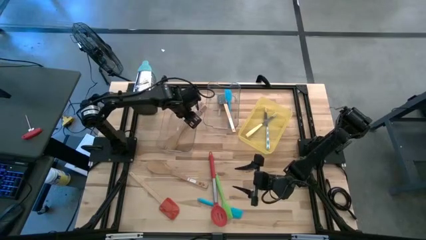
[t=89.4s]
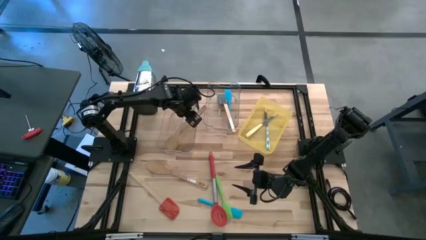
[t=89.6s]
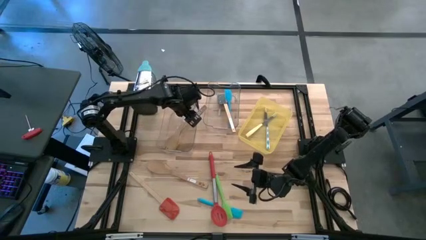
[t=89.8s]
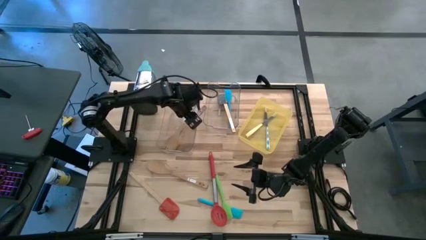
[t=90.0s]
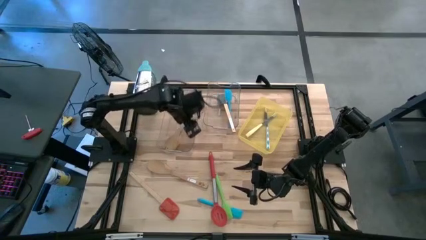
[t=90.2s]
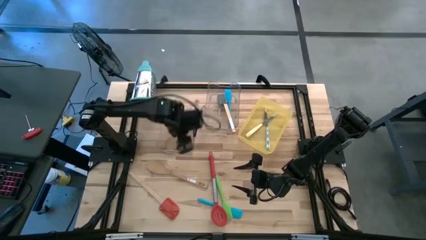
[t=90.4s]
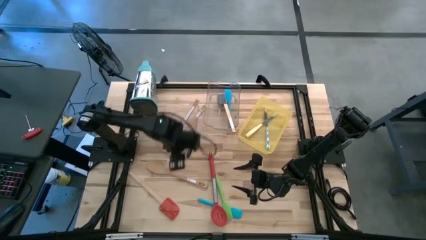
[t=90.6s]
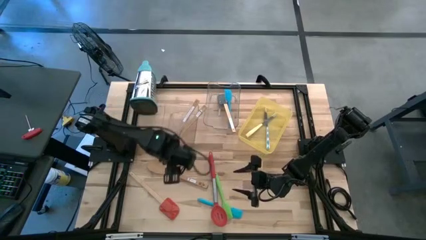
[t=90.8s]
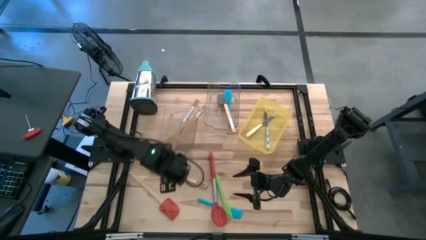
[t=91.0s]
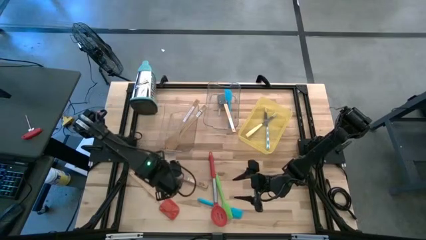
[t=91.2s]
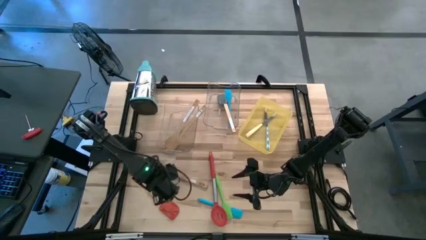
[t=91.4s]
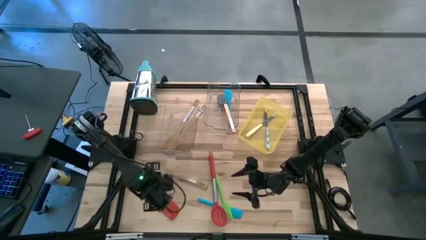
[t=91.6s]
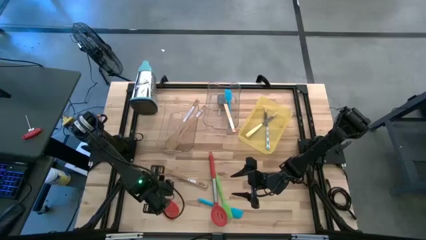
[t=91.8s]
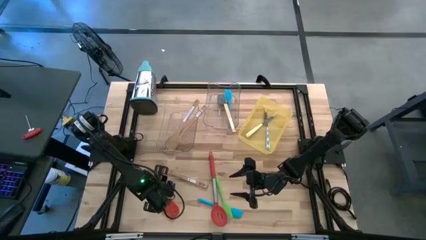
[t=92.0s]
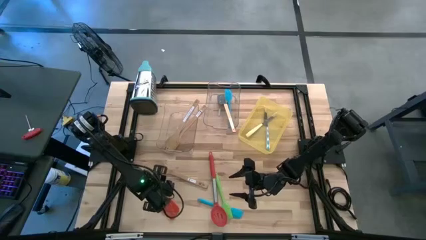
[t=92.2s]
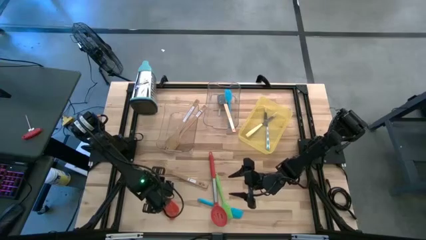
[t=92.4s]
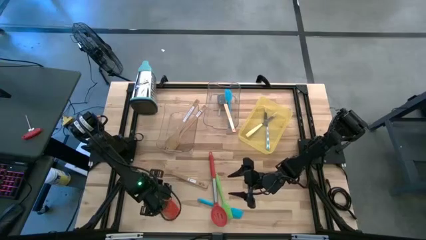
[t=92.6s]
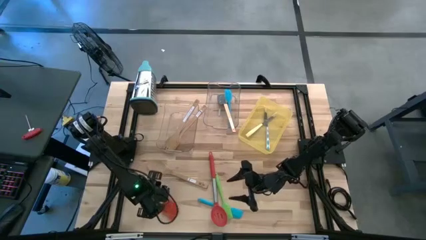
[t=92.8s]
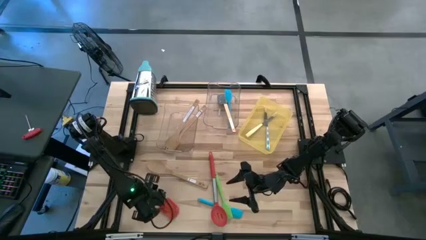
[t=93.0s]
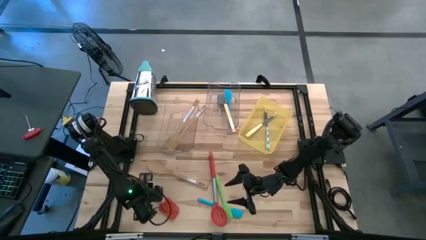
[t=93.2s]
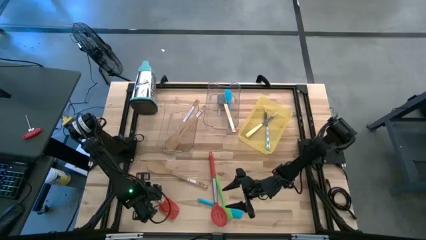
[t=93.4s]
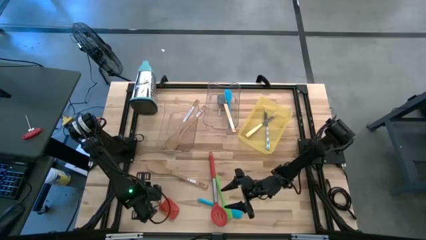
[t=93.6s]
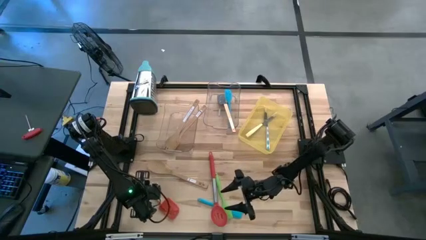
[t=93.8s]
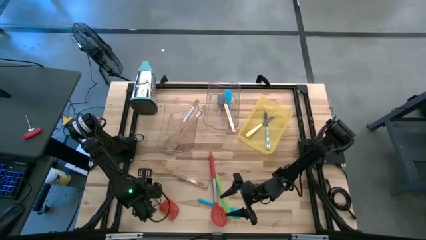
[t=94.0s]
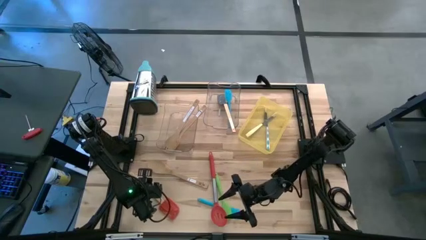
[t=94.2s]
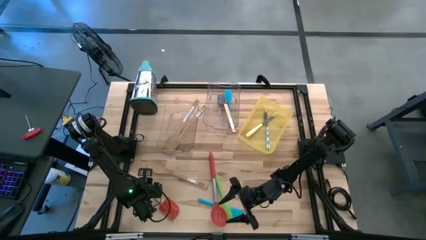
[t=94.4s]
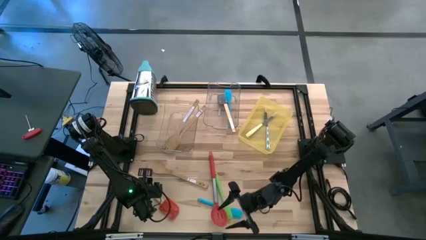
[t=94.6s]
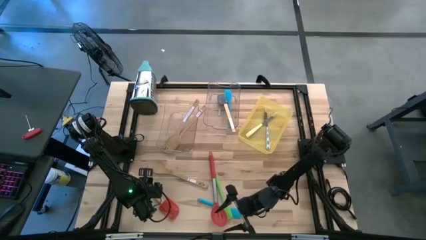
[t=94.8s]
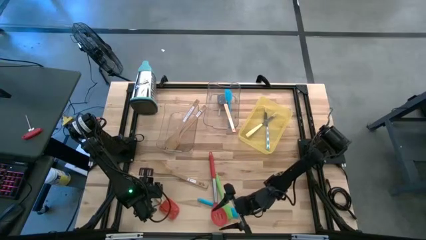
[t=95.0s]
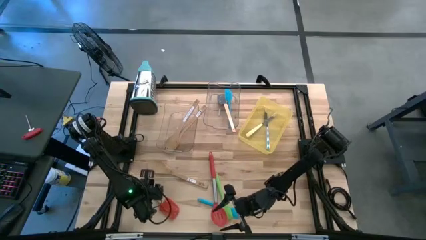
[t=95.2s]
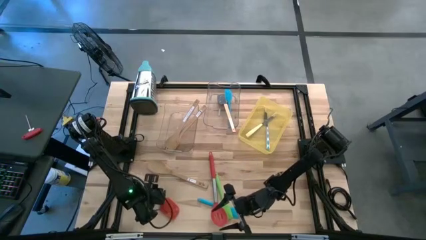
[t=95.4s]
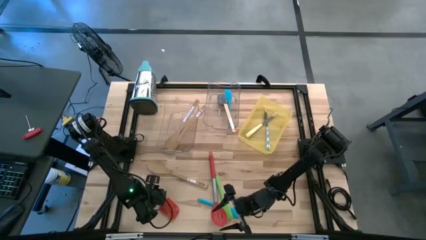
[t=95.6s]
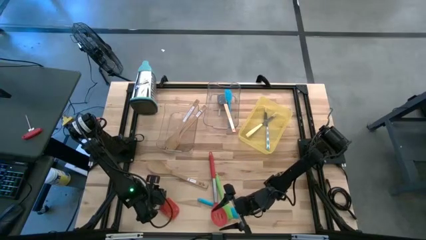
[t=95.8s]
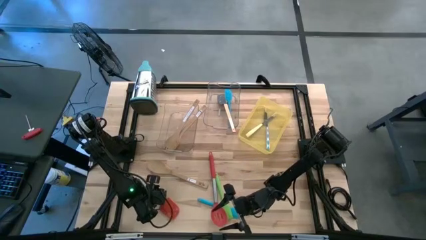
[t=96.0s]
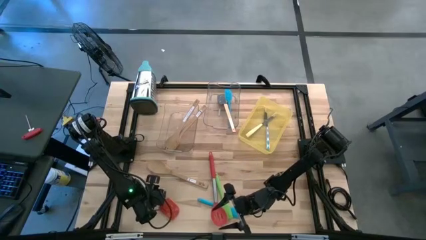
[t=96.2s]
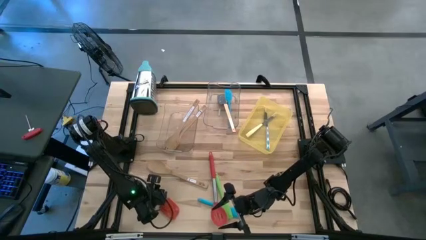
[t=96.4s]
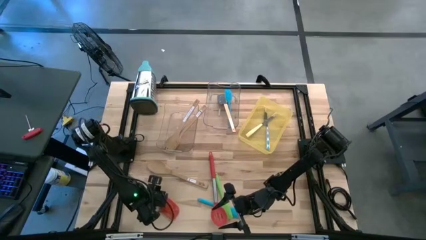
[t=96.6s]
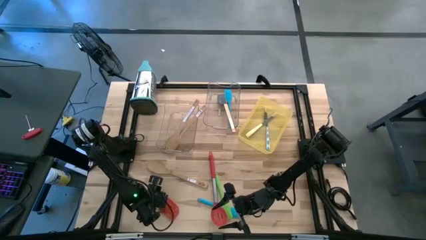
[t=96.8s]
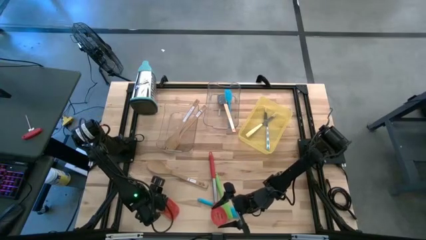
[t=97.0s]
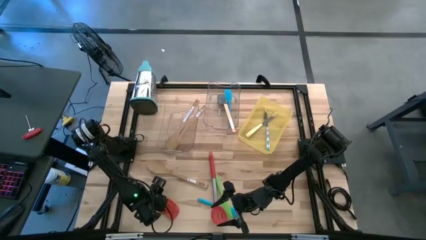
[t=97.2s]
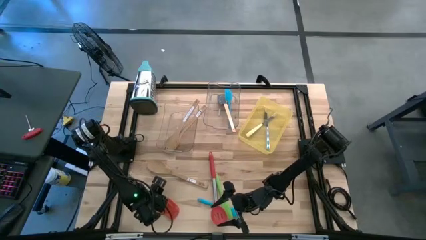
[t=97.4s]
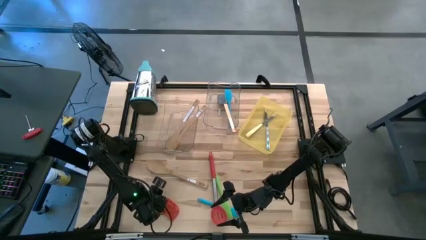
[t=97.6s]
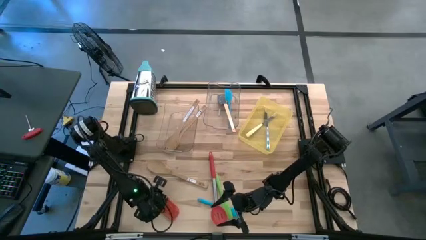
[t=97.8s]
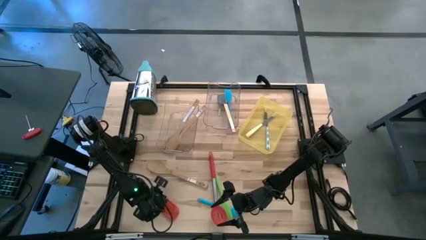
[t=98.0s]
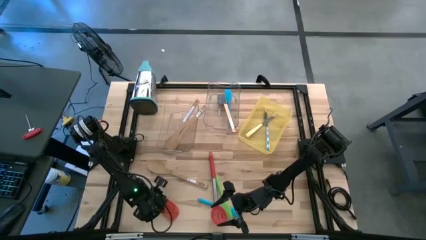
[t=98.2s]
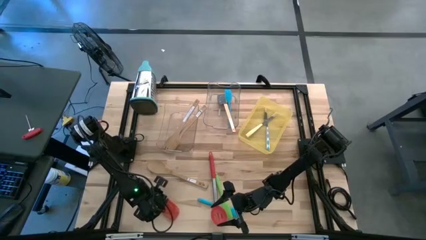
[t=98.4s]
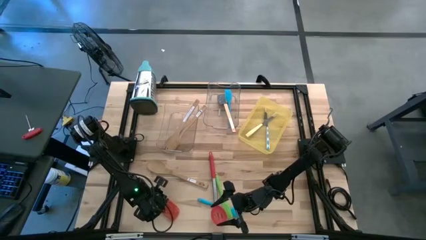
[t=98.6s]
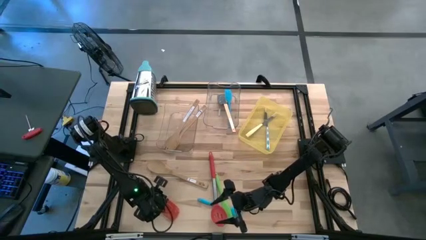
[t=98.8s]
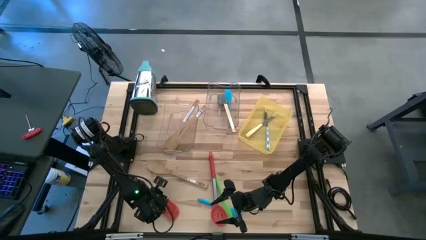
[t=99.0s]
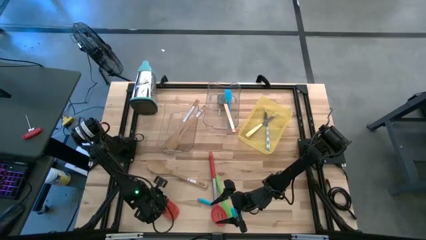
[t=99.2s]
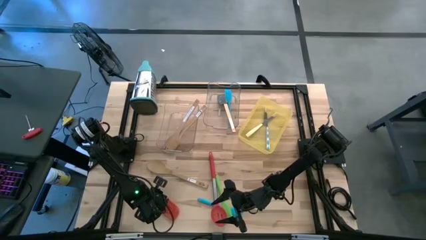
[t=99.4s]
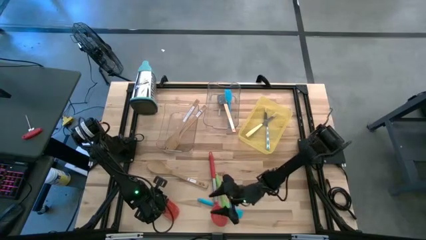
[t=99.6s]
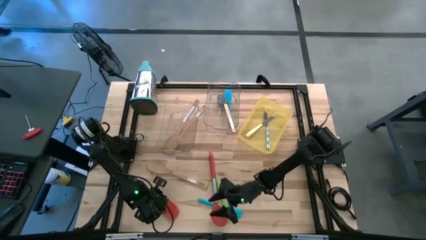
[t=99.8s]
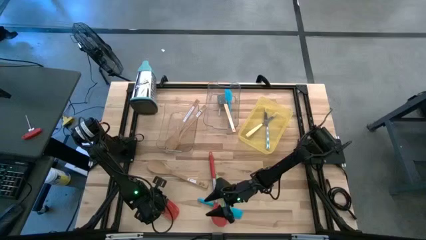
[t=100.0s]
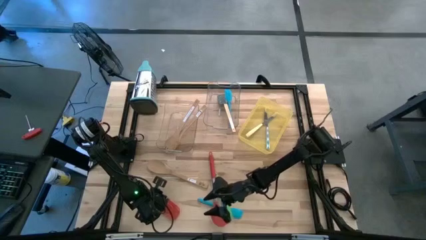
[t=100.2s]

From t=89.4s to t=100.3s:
Task: Pick & Place Kitchen Items
Put the red spatula into the top right transparent bin

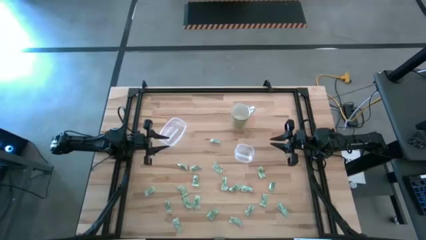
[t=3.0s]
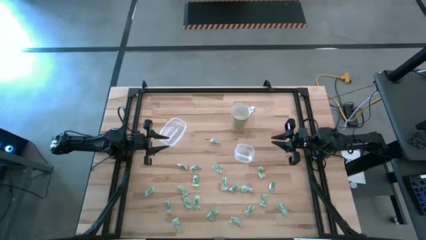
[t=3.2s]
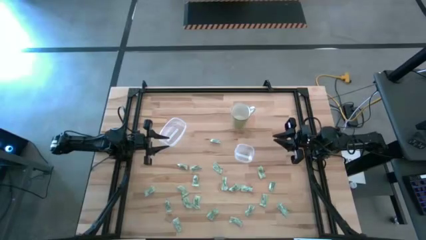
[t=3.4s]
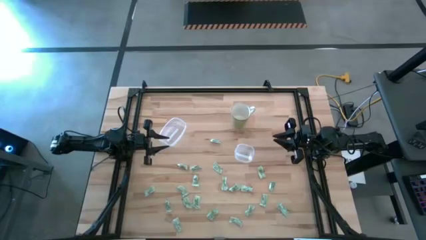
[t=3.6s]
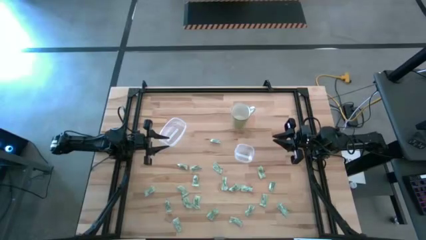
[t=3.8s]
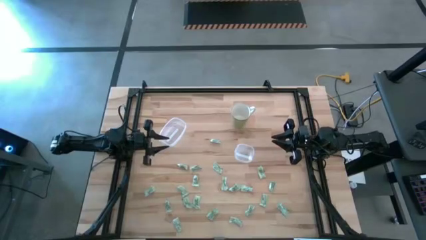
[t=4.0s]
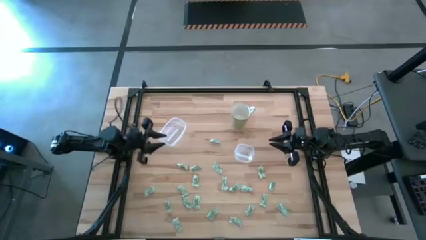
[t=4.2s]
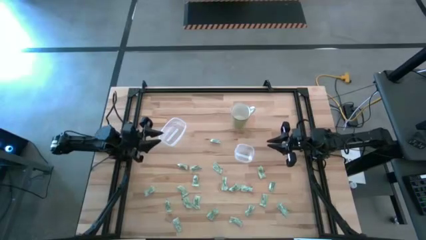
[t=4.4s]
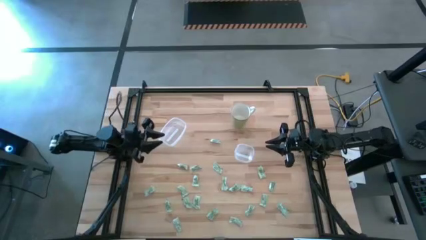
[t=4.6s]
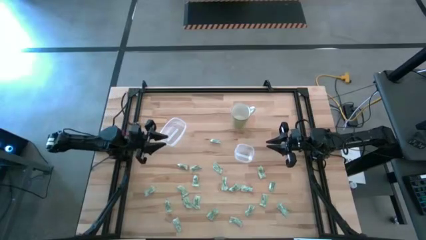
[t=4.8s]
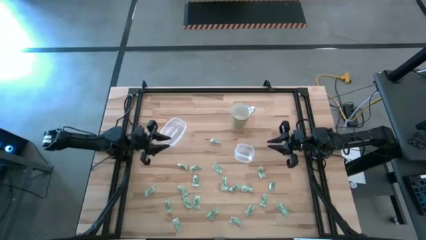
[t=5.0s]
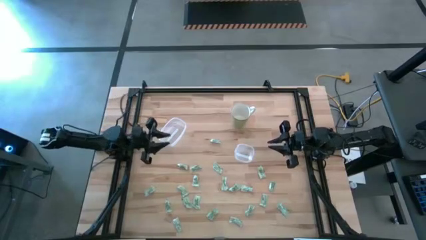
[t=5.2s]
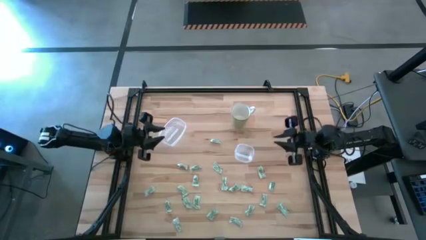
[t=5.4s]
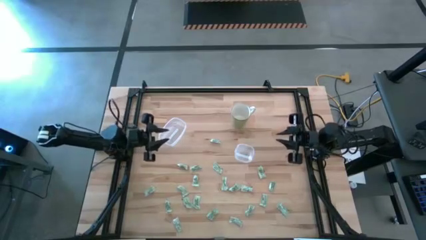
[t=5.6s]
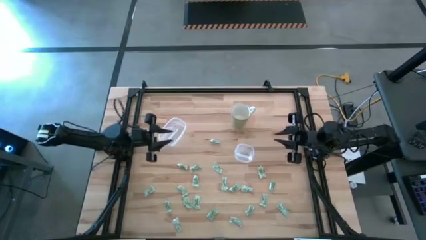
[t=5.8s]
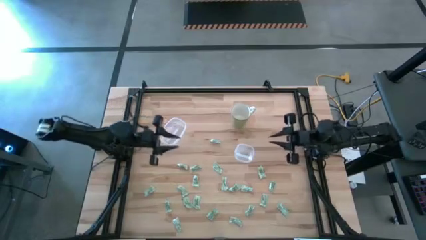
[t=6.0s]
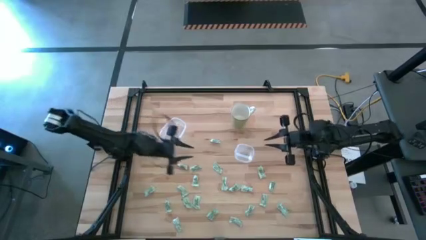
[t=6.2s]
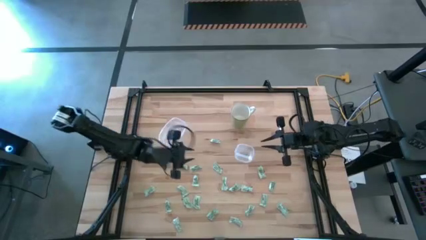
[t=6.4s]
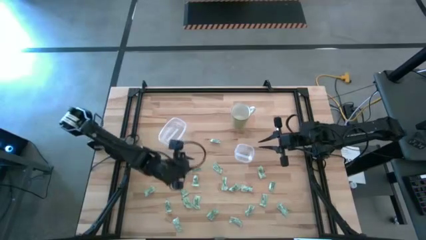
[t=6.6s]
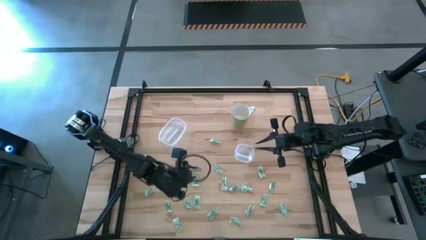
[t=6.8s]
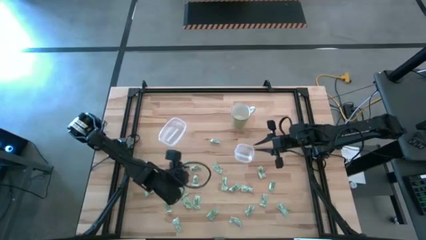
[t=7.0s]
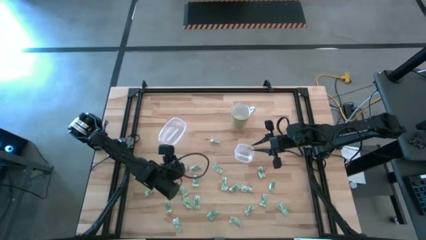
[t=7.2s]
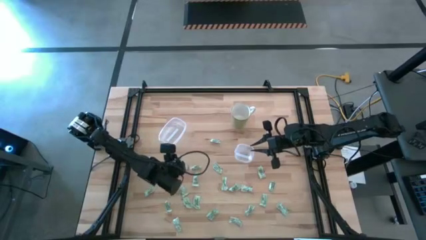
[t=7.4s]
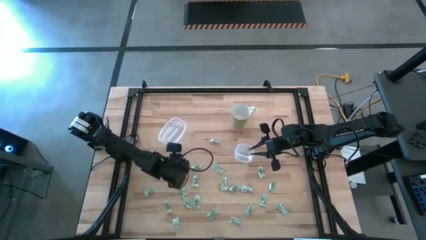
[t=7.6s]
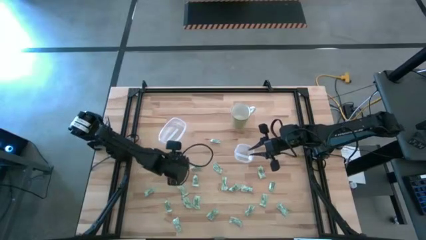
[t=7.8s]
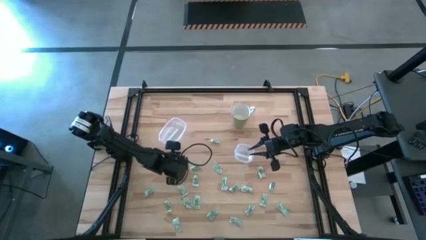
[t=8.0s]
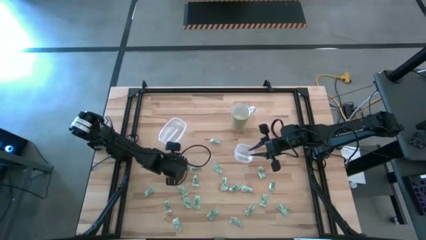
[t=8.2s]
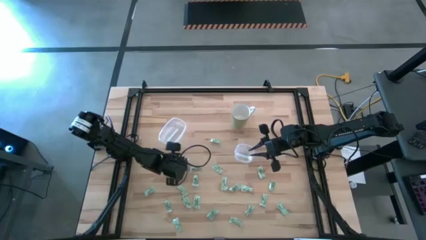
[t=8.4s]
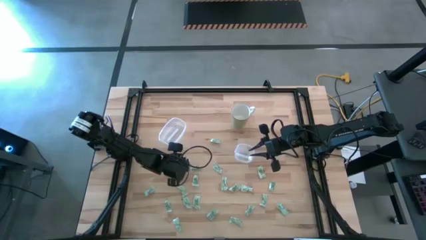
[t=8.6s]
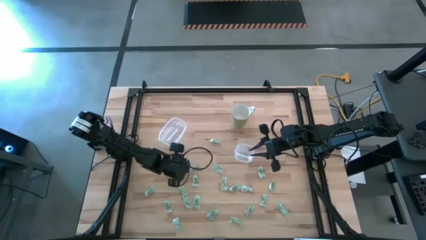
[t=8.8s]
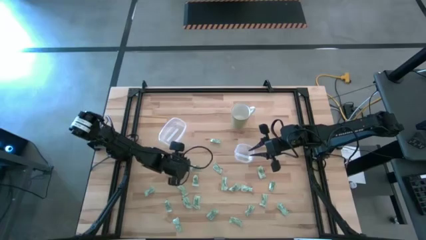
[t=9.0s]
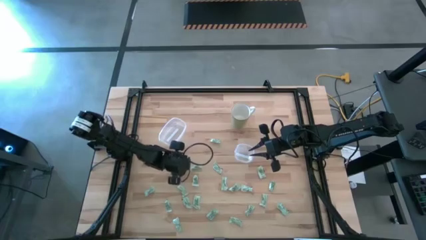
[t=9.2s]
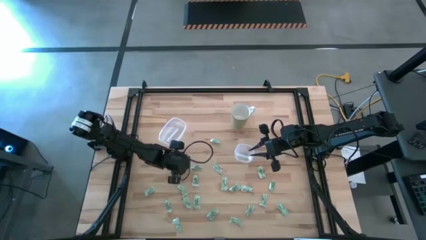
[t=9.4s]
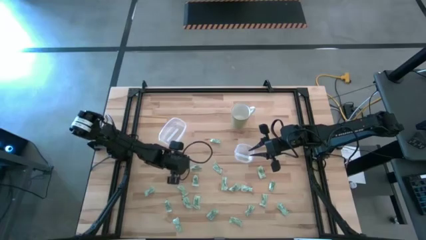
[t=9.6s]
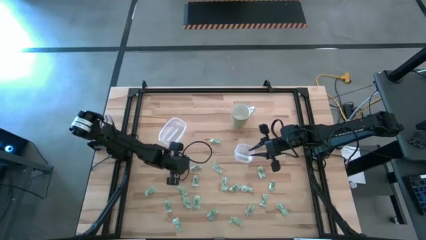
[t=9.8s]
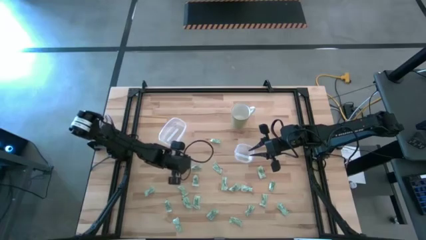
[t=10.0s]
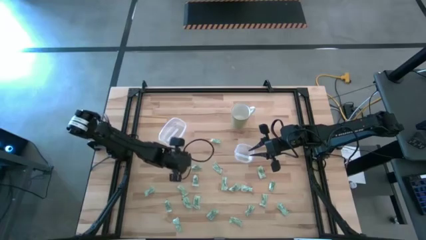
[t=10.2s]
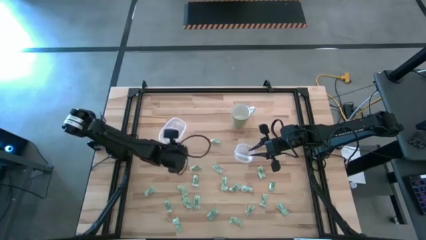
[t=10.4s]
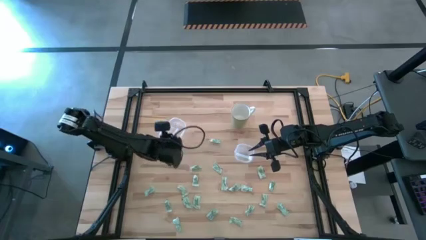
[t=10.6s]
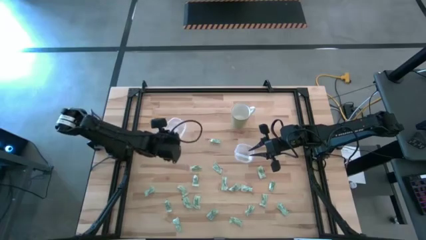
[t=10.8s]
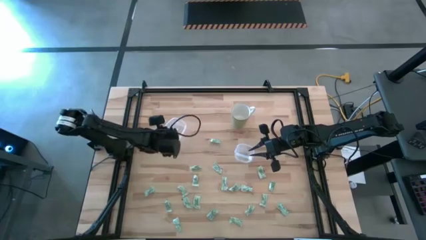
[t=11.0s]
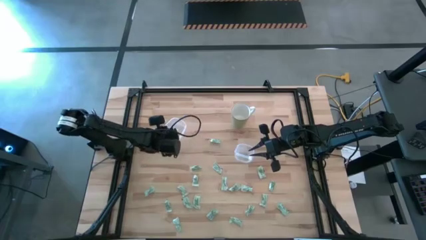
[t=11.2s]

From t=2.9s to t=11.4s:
Task: Pick and place Stevia / Truvia into bins
Put the stevia packet into the left transparent container
